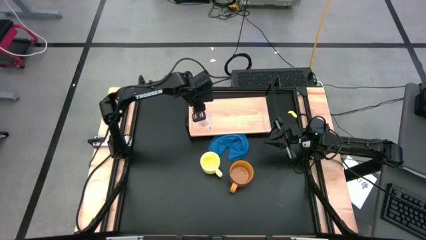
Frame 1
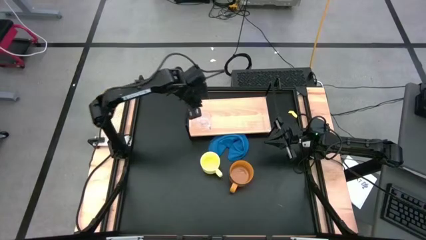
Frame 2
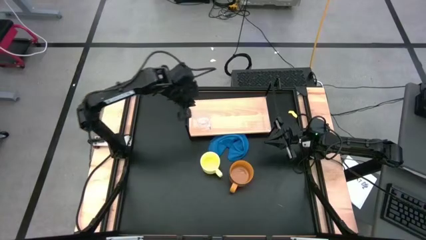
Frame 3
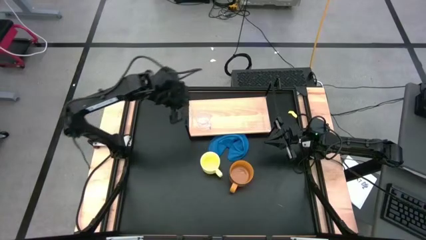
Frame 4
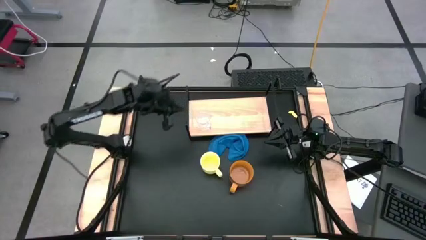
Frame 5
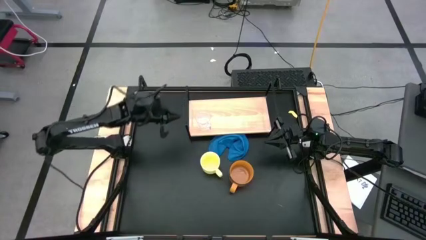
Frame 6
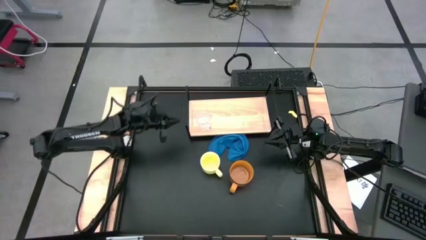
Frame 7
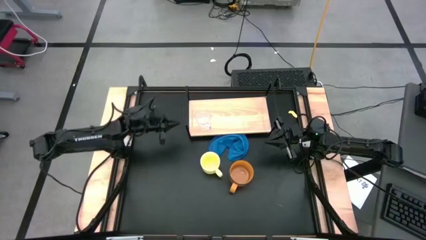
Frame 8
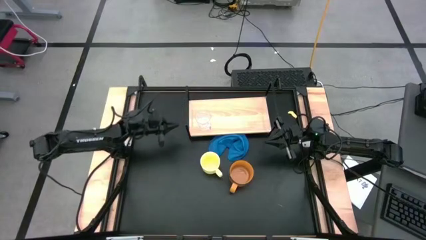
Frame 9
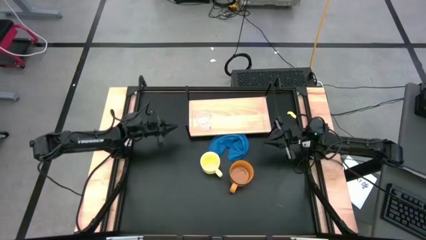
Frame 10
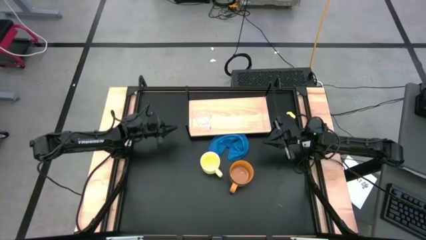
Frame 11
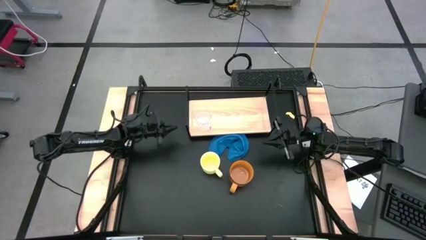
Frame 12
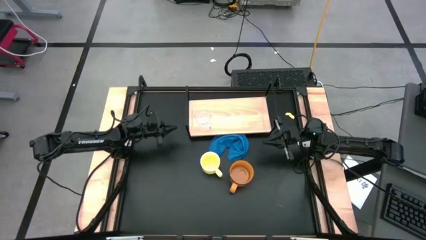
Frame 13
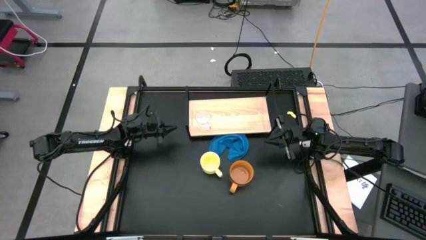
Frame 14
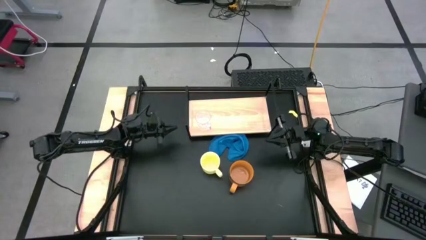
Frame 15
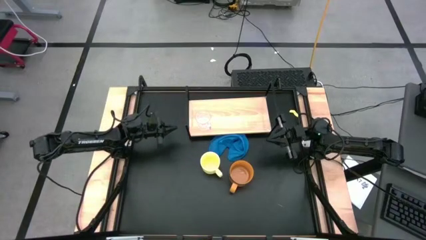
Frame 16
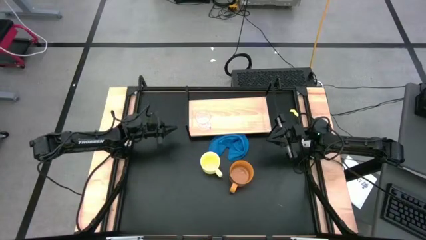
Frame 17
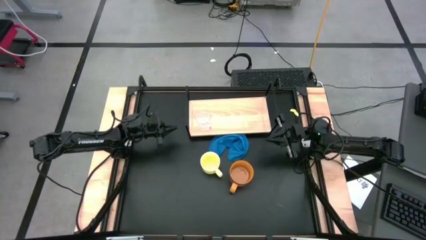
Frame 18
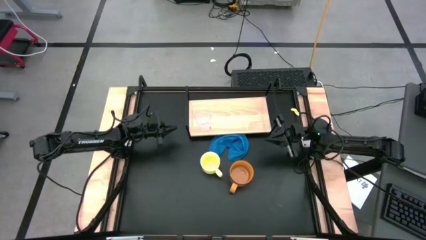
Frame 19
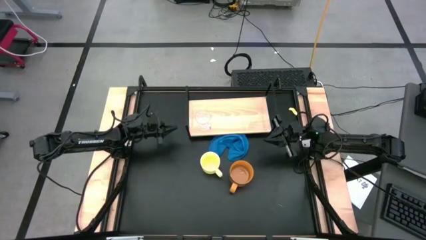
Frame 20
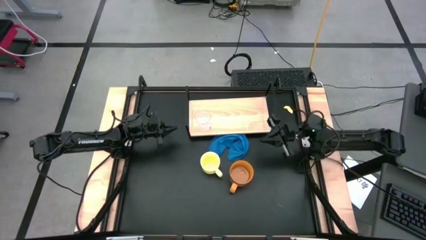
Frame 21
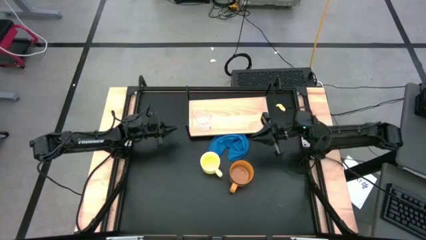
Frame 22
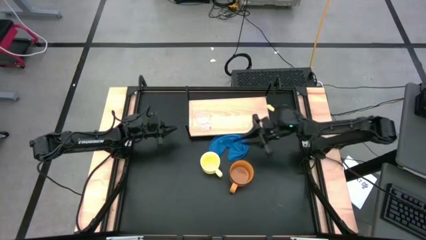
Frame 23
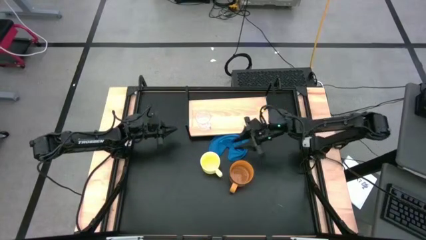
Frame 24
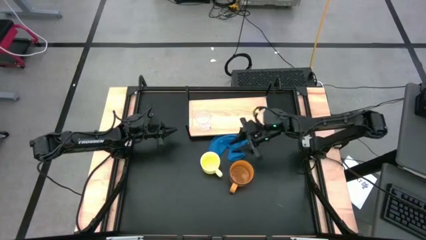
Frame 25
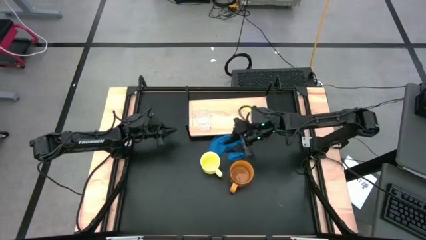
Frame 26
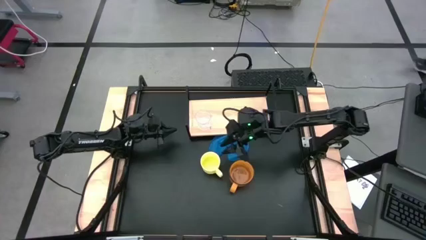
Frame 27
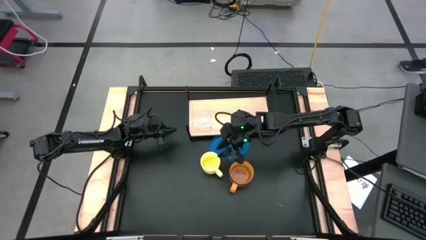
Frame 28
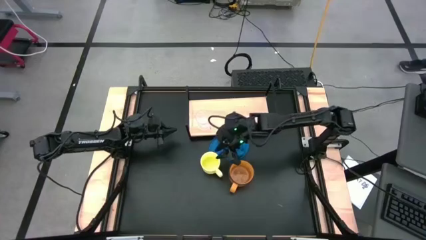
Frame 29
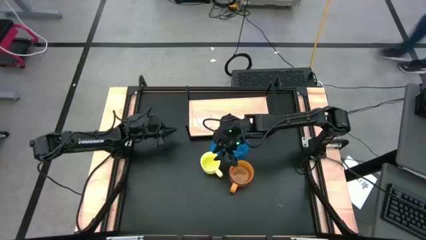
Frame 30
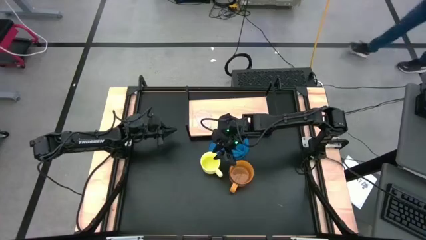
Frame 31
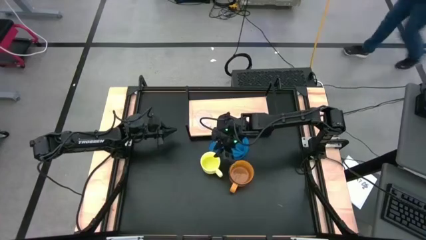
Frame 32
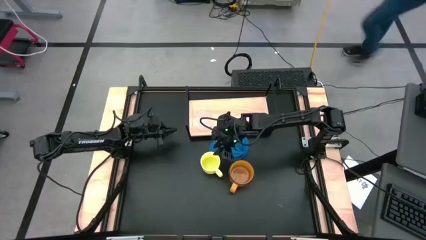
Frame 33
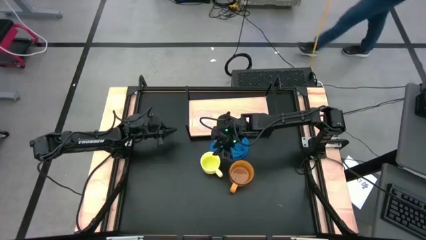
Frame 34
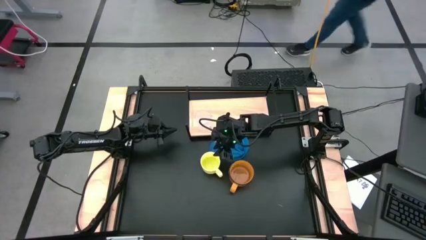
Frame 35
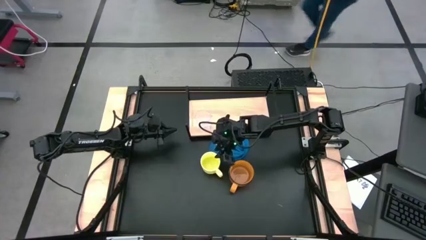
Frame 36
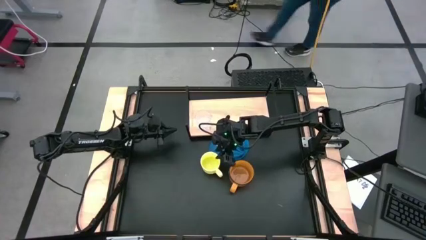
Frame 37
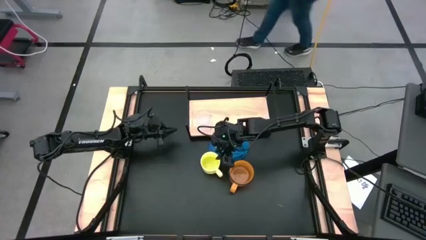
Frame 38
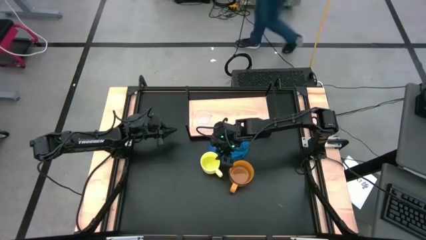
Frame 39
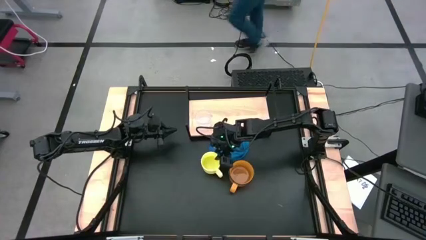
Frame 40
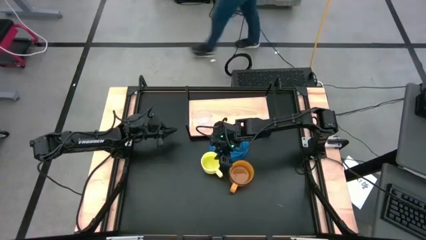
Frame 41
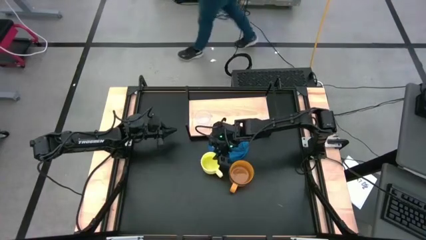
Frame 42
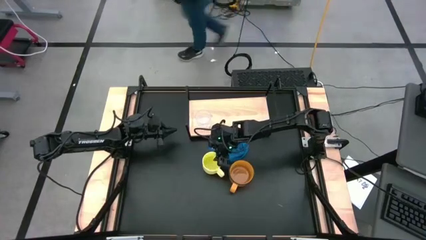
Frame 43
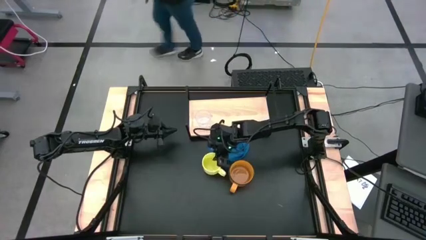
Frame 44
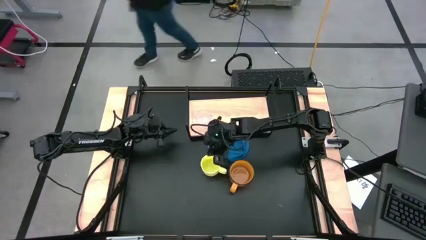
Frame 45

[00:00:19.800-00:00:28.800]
Task: Stack small to large cups/mugs on shelf
Put the yellow mug on the shelf

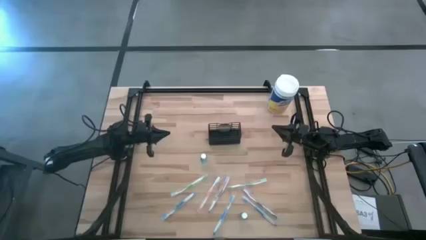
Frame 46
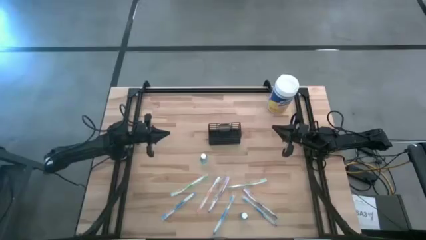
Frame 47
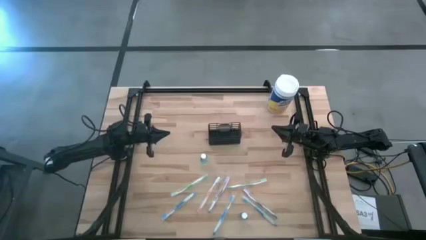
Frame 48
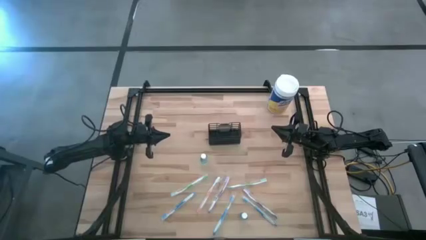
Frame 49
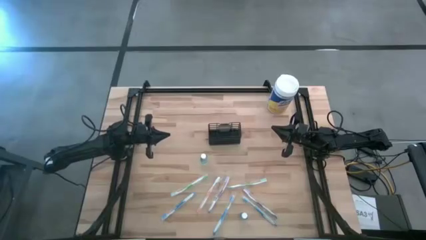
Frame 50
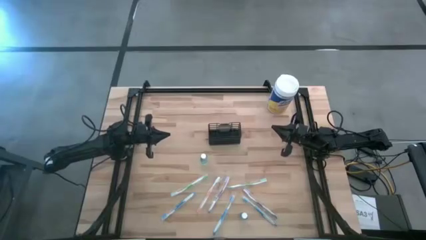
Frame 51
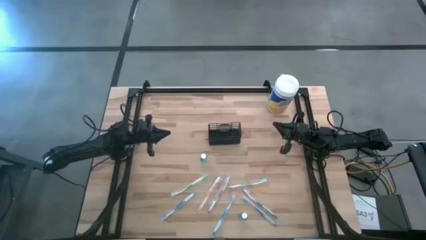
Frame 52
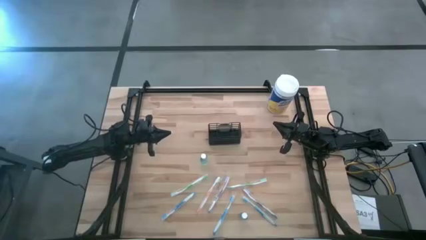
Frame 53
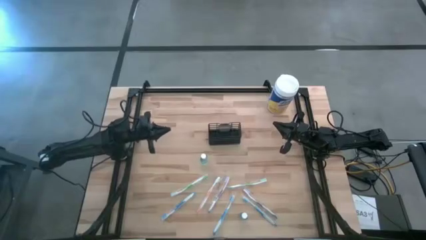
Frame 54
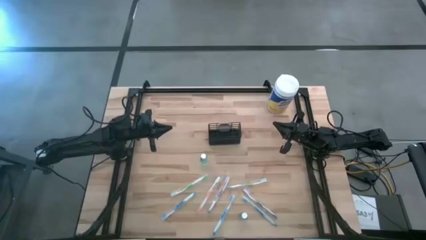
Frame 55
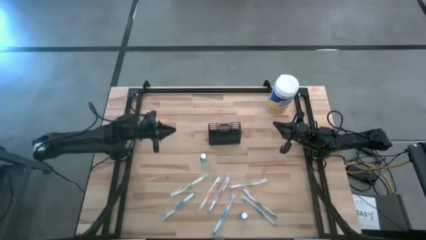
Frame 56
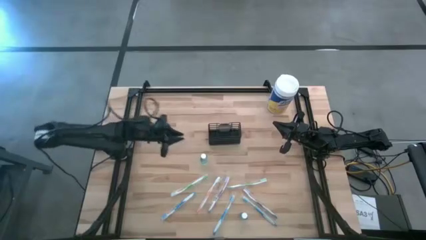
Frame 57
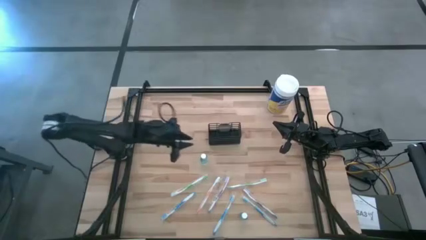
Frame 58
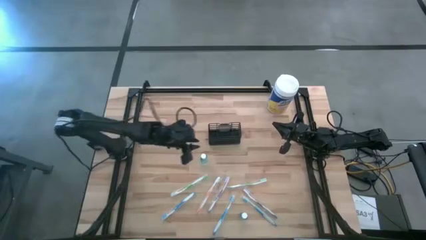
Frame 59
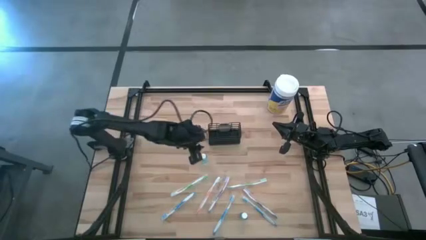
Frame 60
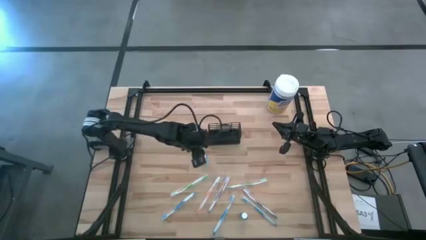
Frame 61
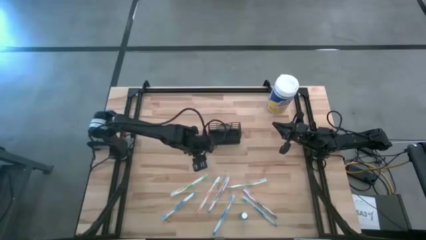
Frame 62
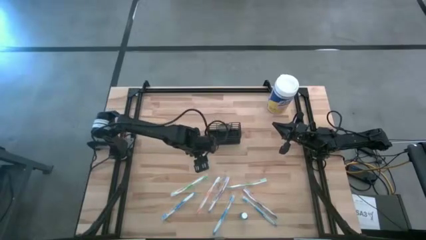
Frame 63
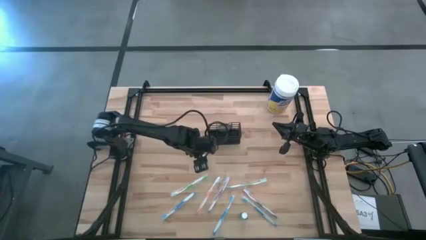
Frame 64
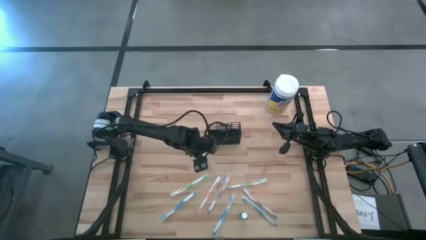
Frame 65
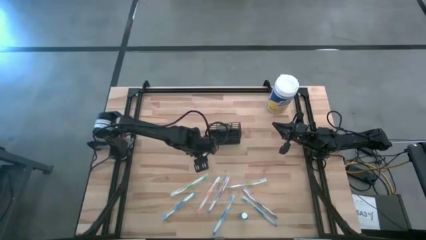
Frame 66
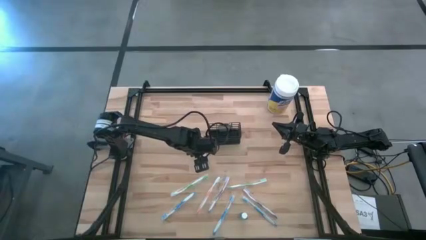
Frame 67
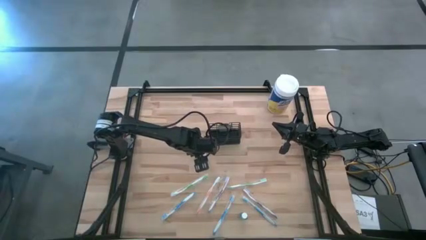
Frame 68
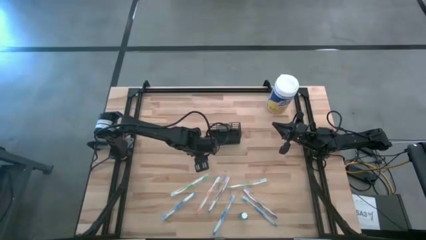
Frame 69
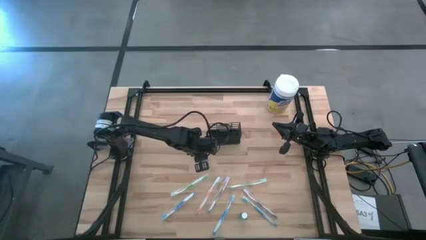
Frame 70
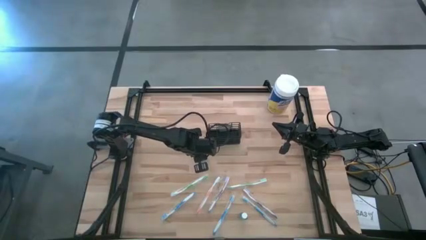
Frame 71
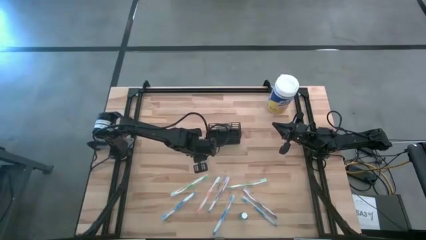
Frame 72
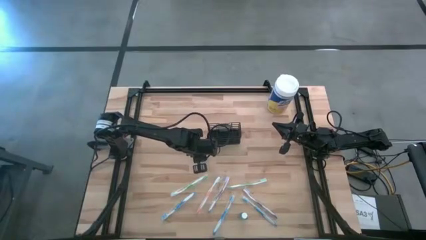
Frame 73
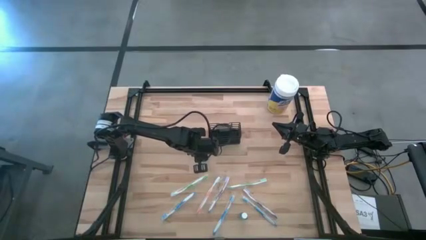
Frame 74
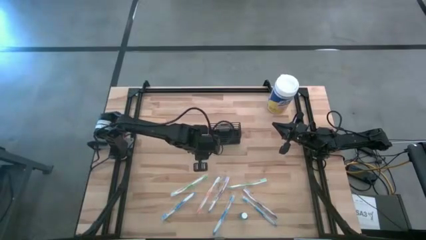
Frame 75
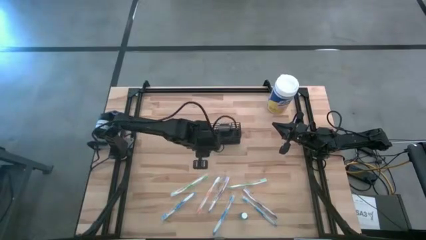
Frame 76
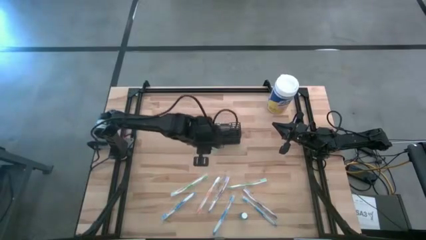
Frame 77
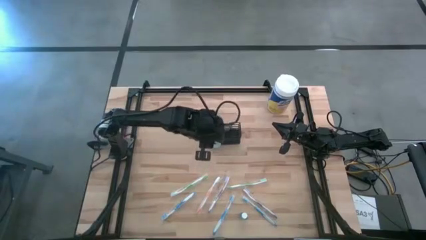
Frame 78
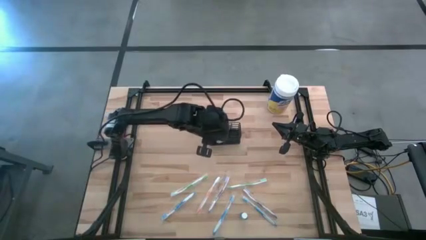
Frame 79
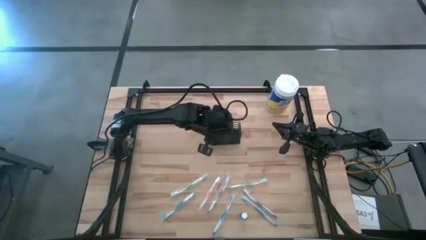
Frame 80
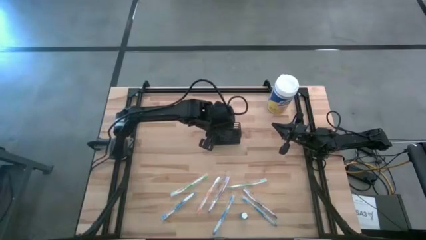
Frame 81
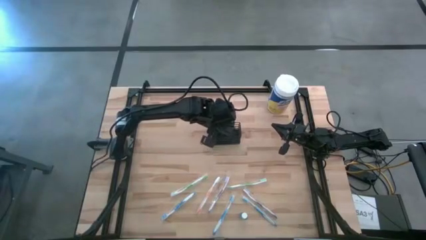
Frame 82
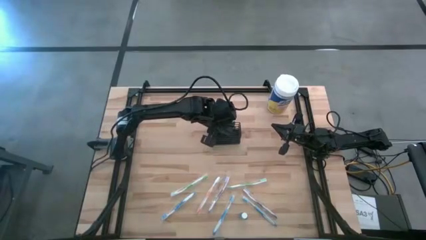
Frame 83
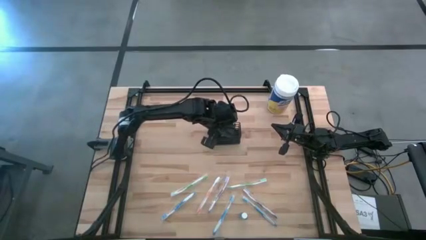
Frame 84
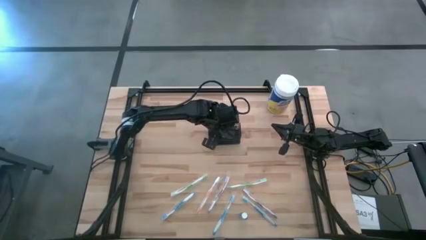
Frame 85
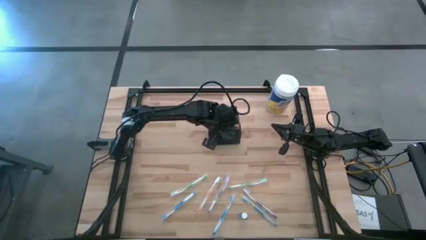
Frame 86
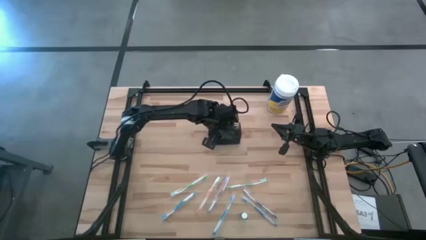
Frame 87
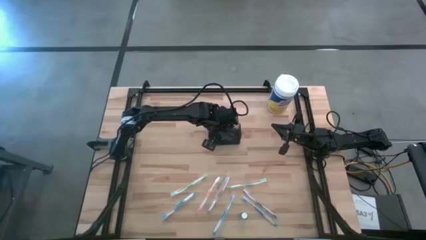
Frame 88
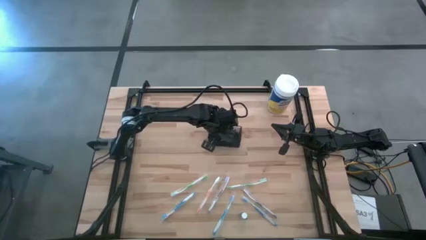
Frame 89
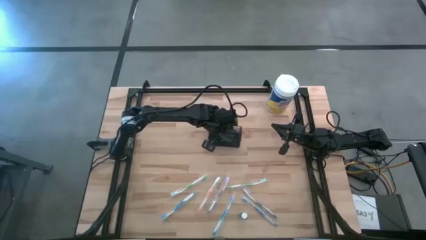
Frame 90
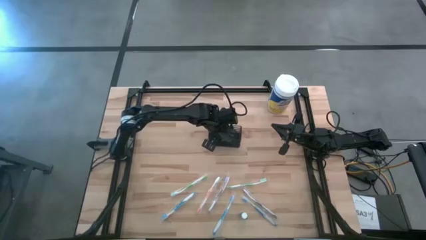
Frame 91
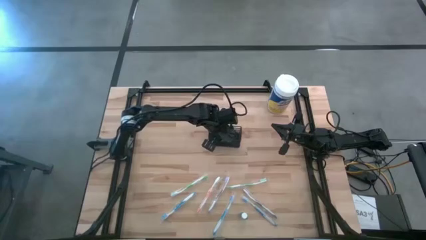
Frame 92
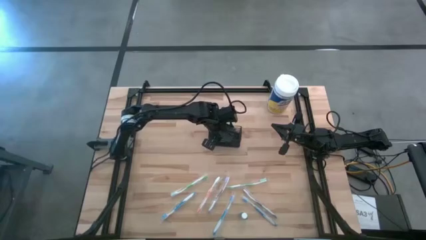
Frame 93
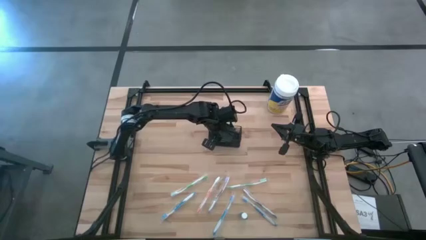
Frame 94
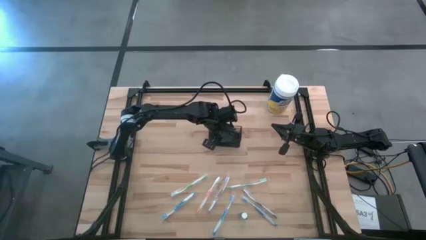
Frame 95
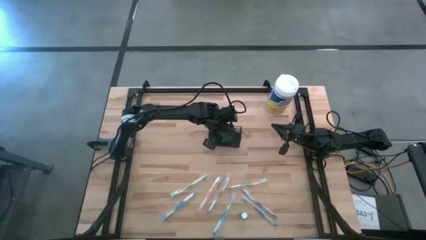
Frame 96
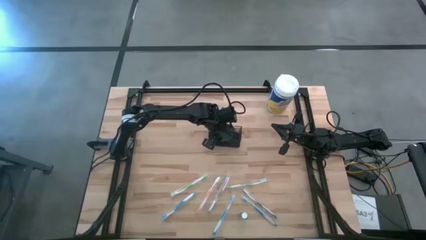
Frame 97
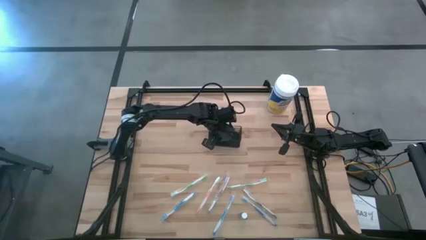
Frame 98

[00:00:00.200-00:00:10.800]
Task: Pick & Place toothbrushing station
Put the top blue mouthwash into the black wire organizer
